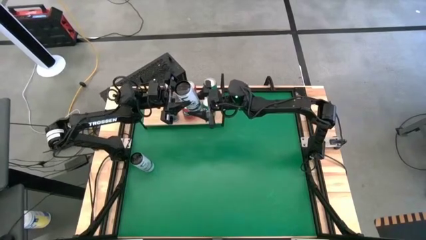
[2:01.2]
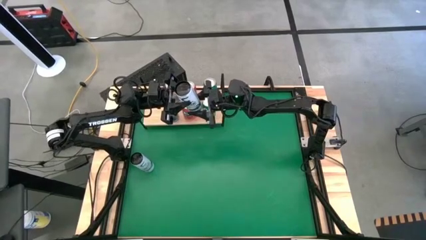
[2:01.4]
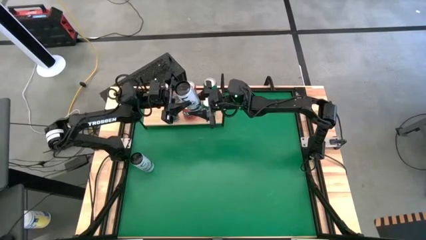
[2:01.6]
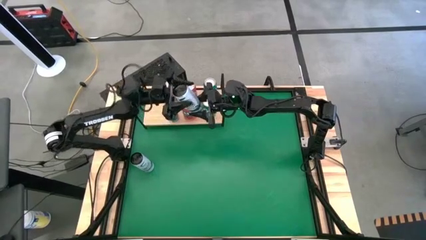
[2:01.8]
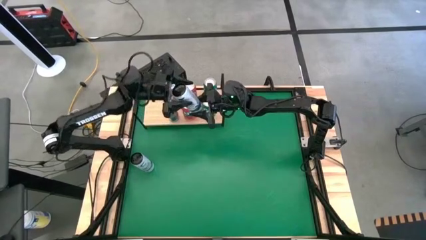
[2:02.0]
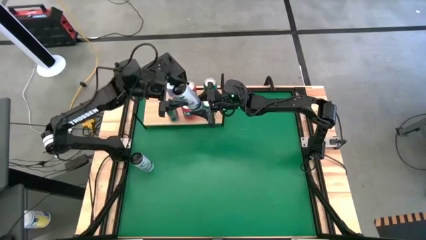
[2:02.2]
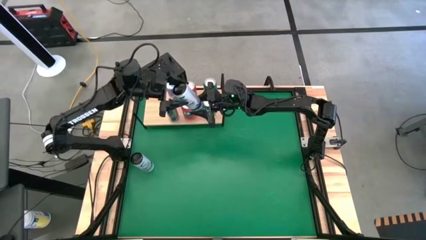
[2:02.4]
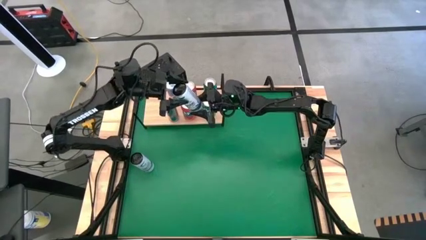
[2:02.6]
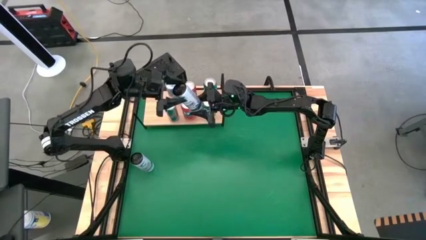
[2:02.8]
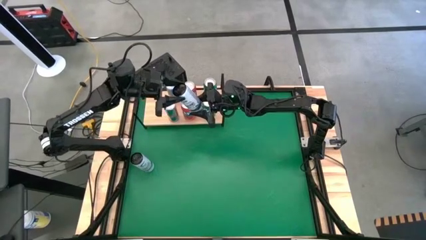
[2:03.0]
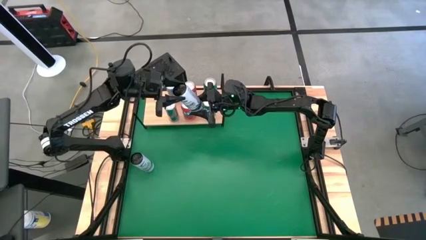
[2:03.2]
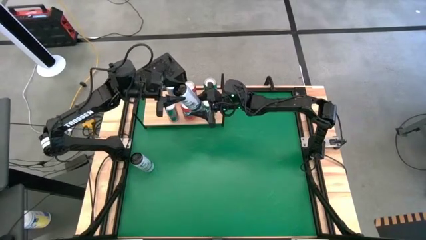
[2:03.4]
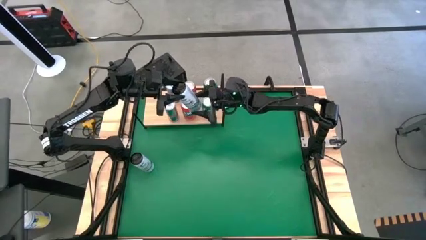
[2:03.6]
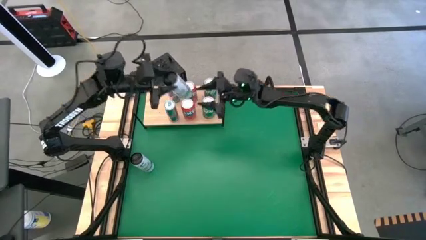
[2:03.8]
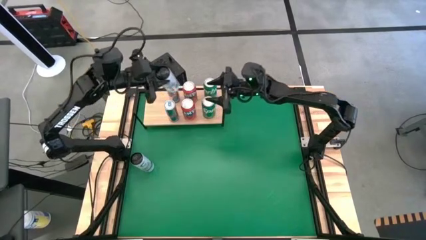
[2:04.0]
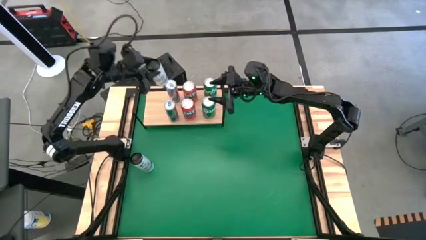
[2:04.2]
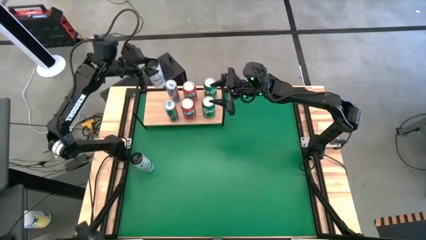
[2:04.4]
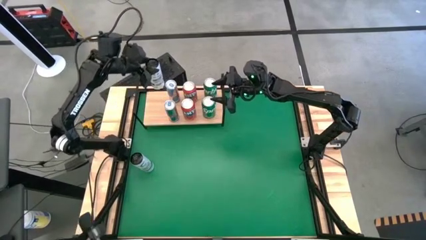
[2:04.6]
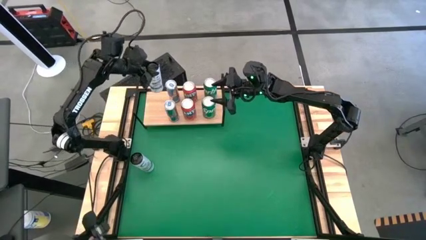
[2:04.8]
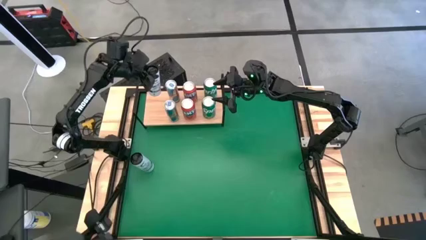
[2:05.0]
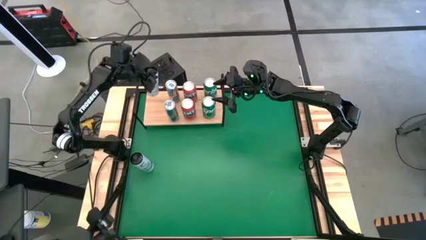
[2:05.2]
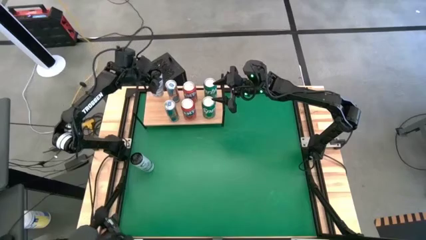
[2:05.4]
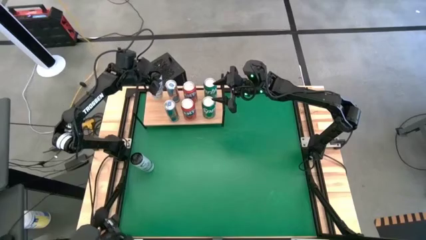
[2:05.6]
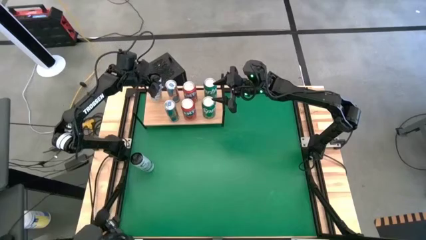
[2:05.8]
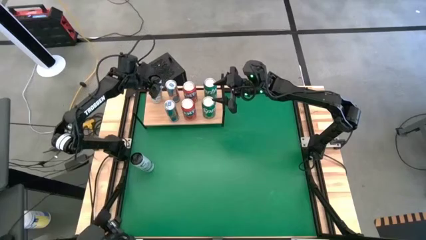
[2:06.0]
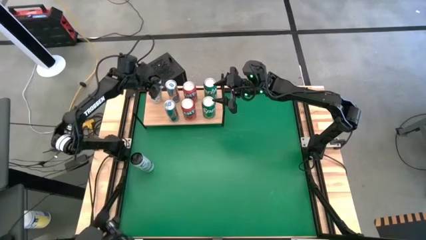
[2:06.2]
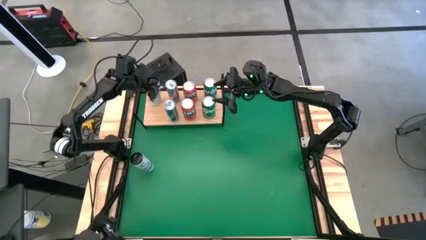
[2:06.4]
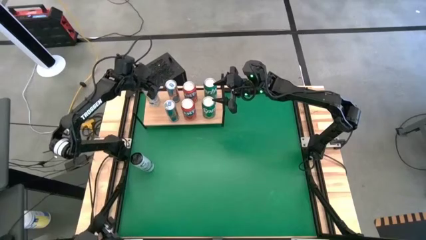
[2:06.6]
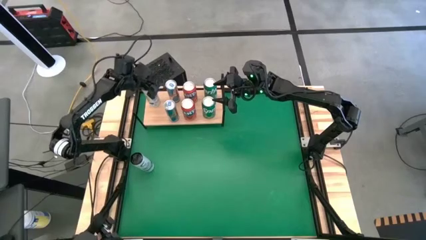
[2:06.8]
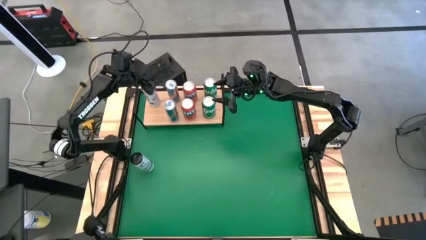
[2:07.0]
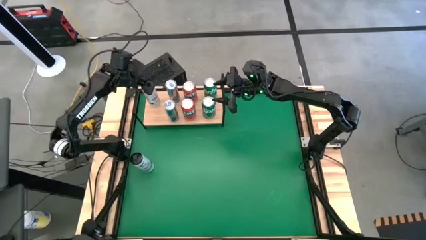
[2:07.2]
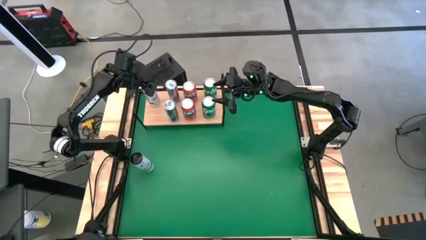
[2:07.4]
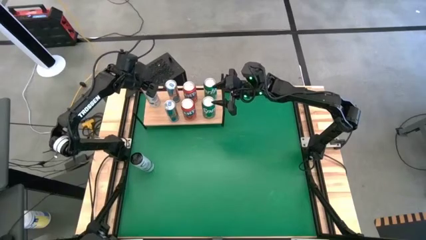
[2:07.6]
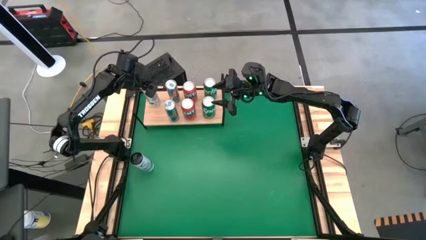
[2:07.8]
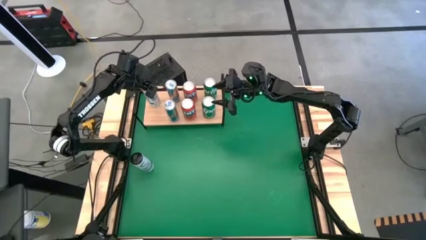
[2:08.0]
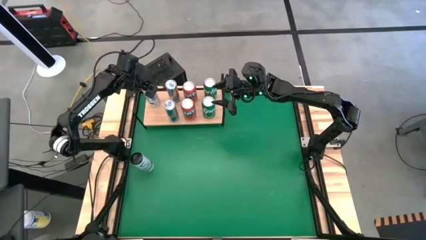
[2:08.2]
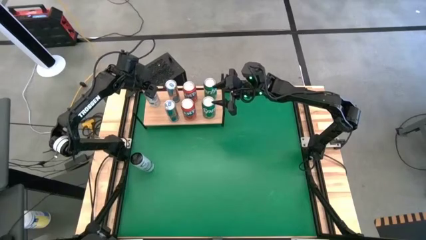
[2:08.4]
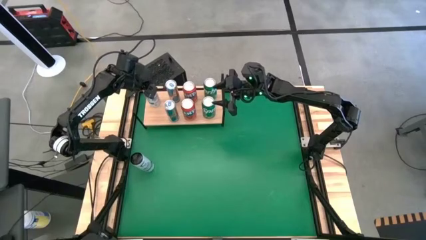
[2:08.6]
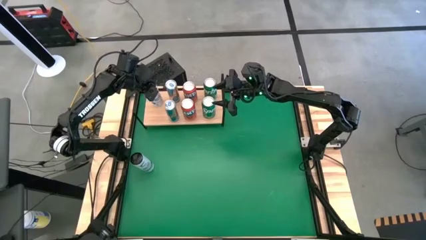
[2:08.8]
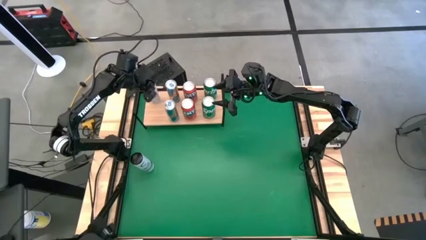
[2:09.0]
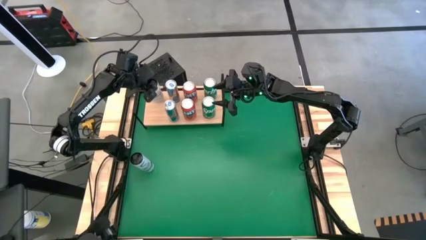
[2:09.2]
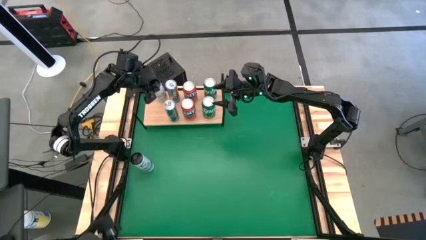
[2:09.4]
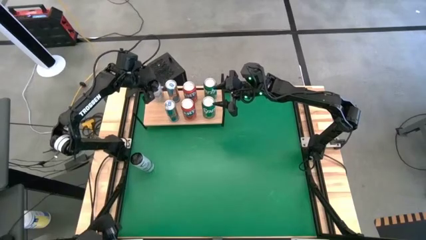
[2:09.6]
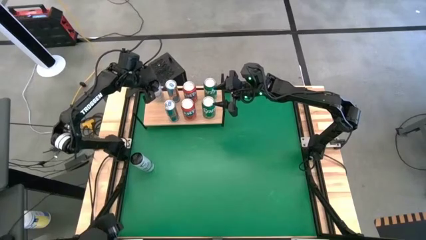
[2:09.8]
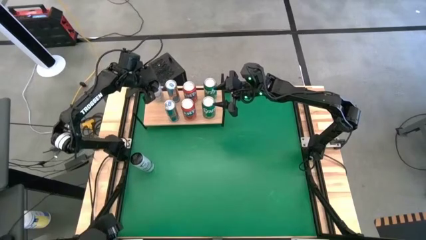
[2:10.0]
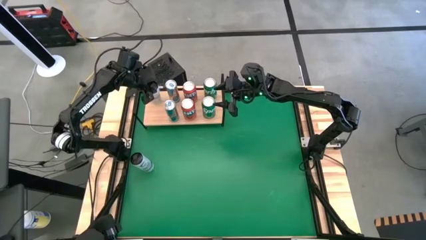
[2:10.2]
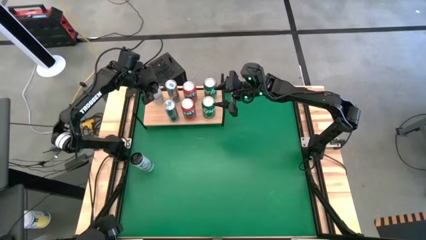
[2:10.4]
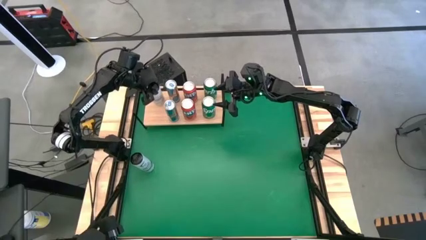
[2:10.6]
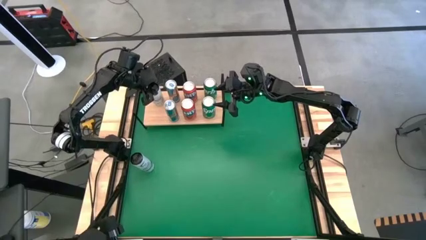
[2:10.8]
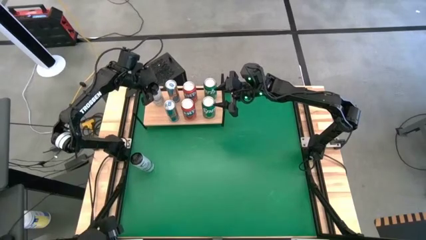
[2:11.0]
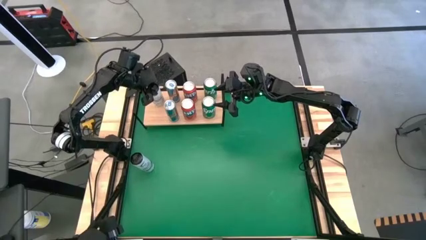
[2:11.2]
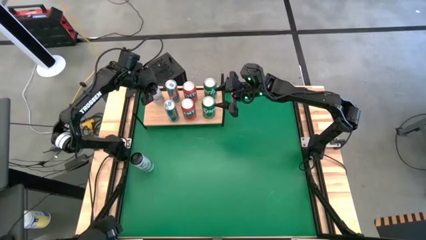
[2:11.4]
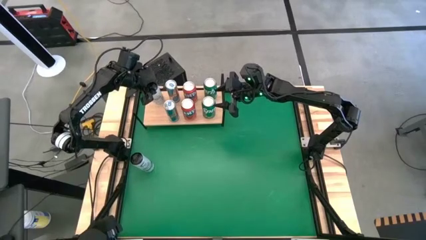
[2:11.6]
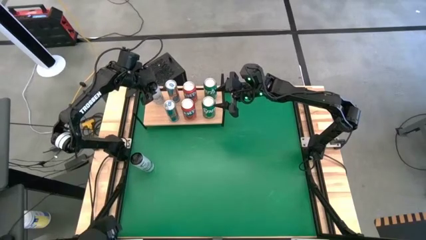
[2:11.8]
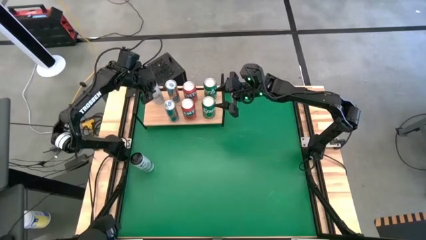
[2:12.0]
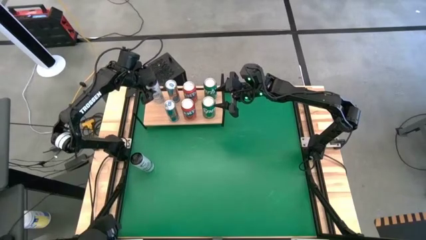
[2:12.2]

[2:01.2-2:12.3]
Task: Place canned beverage on shelf
Put the top white-blue soda can on the shelf

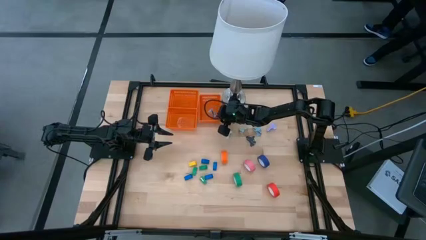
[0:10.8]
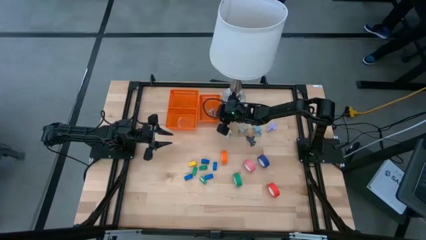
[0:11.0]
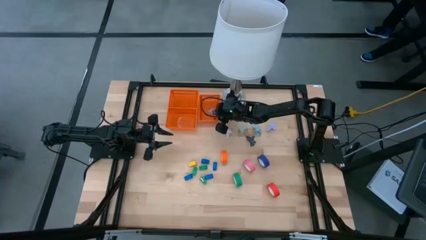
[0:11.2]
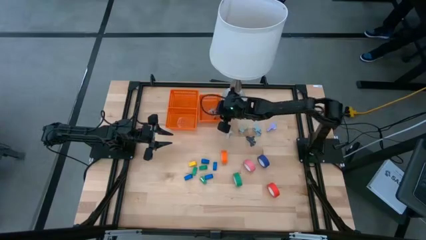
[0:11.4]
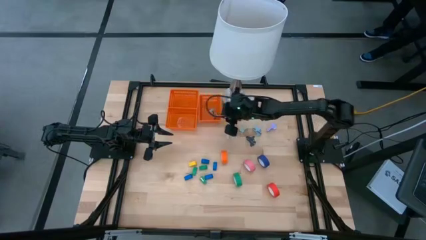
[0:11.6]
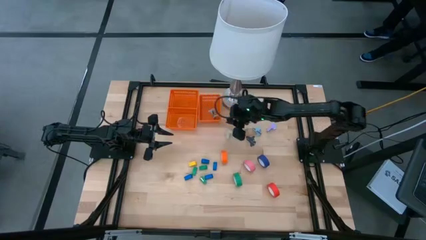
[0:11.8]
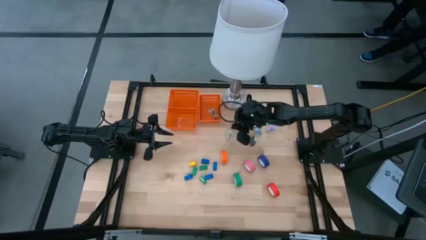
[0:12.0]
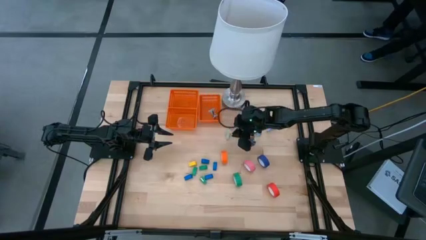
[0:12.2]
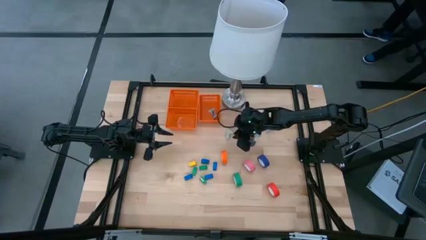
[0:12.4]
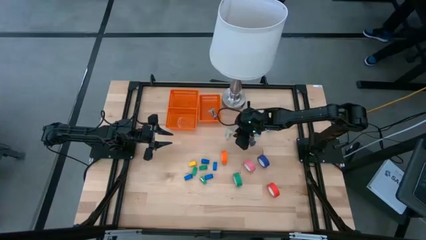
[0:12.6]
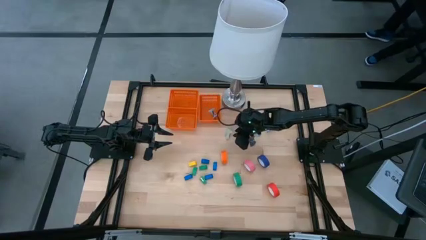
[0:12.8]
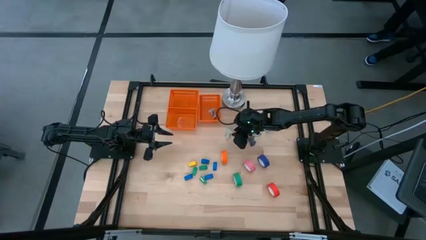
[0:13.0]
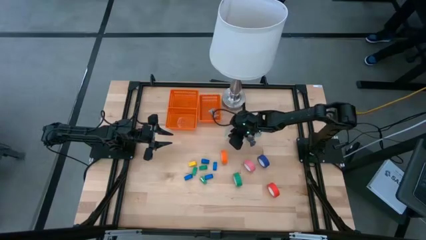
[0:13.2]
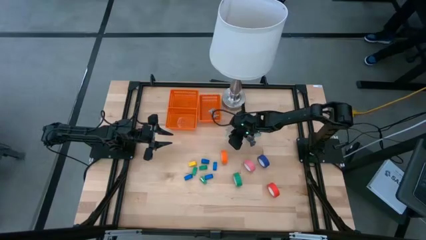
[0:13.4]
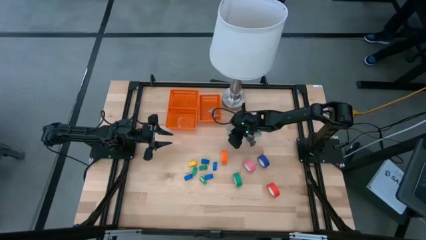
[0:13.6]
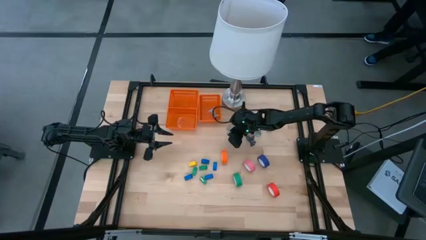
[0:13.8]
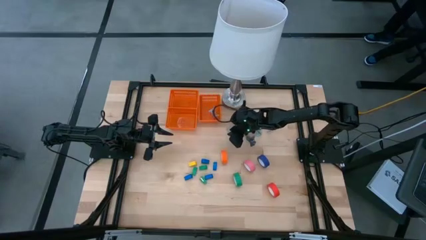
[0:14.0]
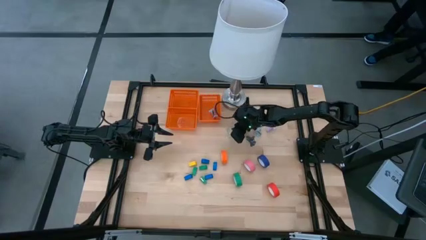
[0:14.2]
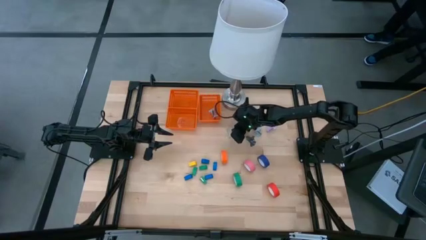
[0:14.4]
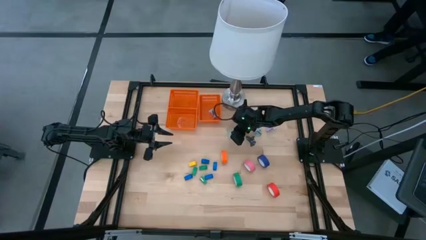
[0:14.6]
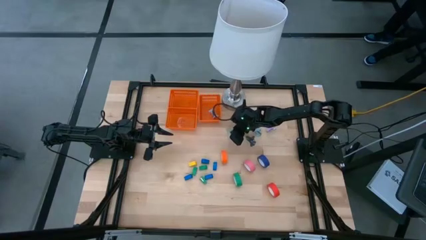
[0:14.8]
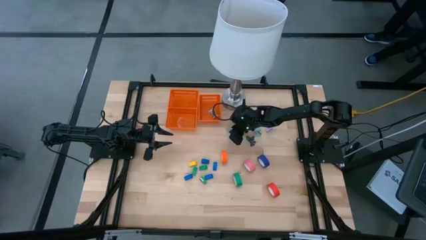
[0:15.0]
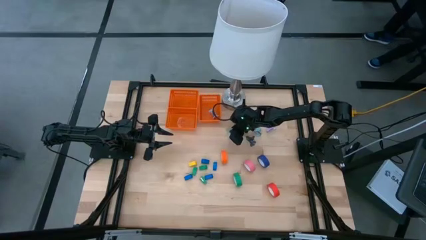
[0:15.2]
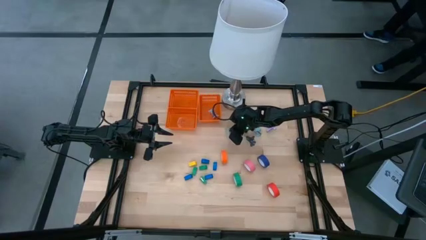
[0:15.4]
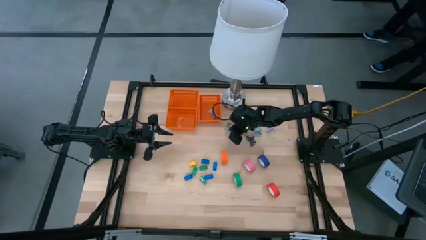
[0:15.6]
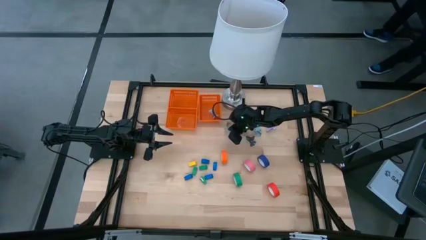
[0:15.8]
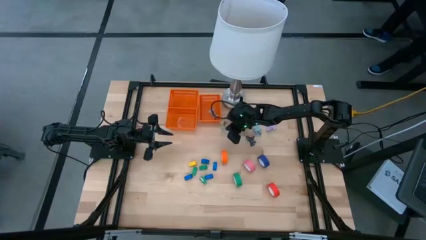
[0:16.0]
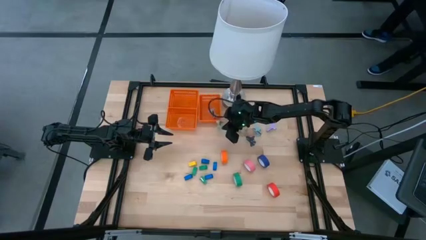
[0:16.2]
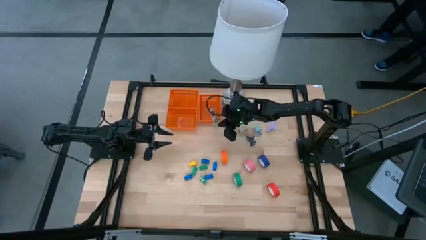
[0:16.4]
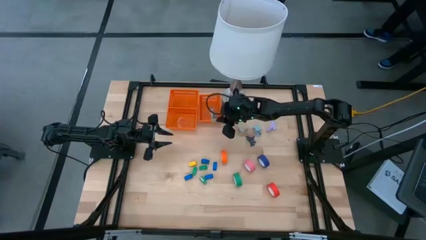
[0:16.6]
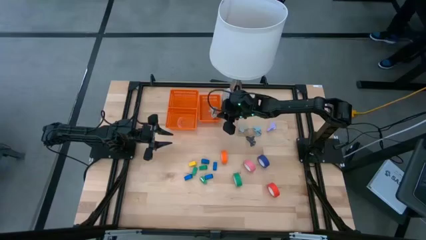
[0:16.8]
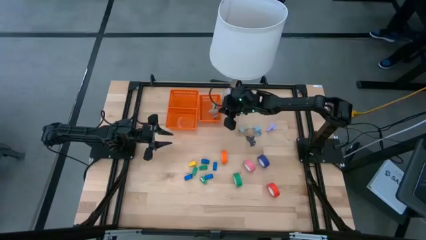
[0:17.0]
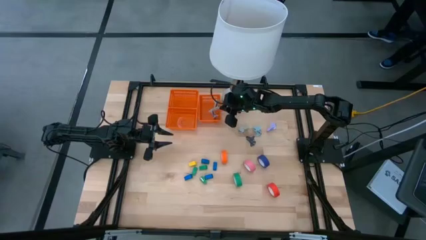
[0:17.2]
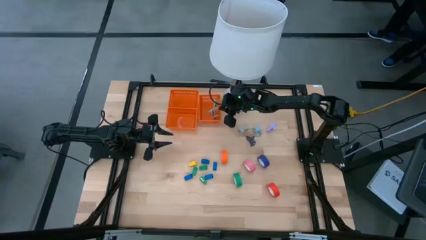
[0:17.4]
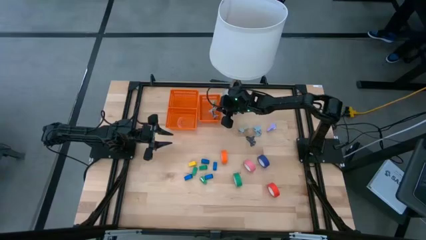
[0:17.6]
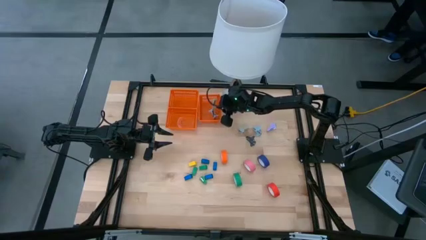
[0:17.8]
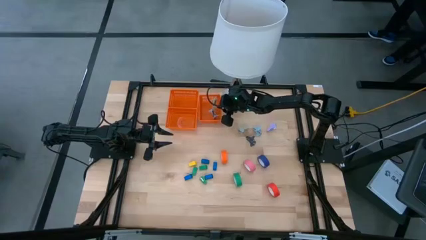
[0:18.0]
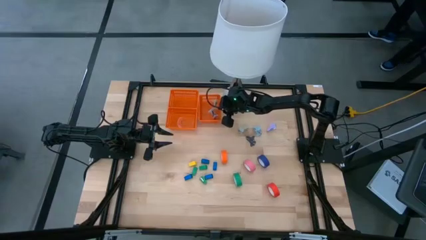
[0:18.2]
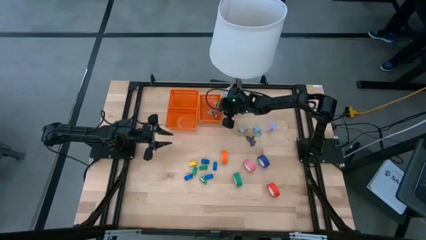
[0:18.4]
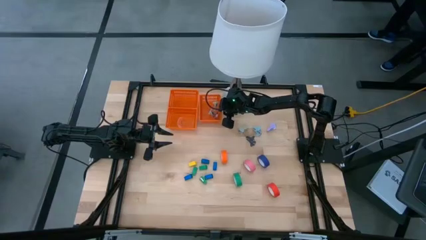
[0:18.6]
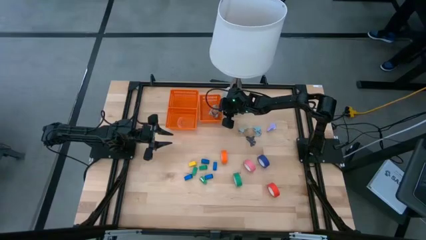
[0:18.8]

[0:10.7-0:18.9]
Task: Pick and place Stapler, Stapler remover, tape
Put the gray staple remover into the right orange basket
